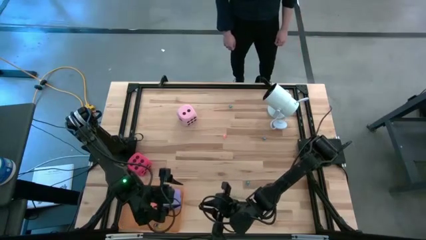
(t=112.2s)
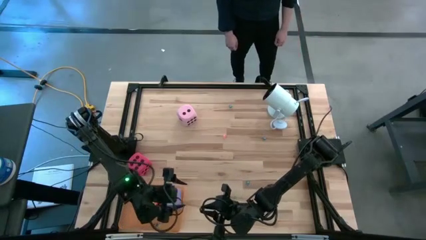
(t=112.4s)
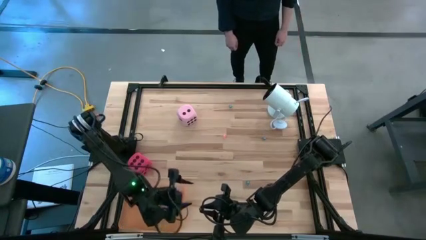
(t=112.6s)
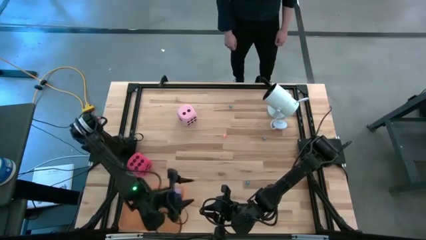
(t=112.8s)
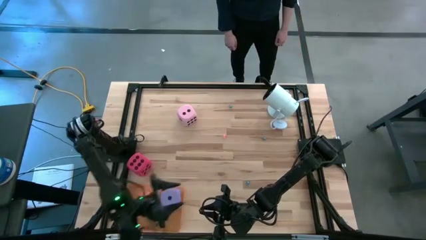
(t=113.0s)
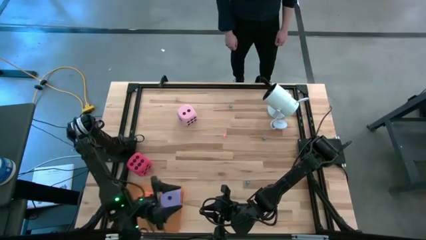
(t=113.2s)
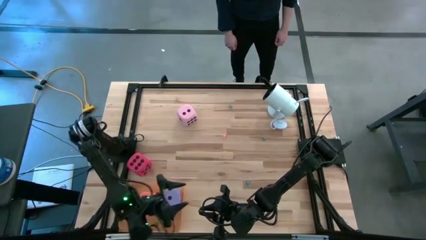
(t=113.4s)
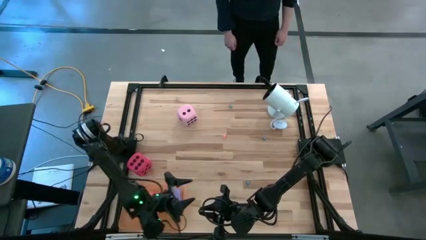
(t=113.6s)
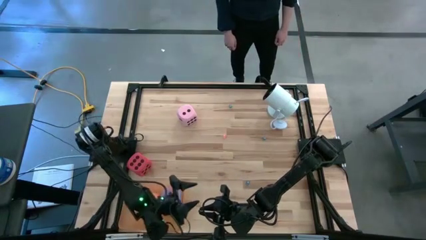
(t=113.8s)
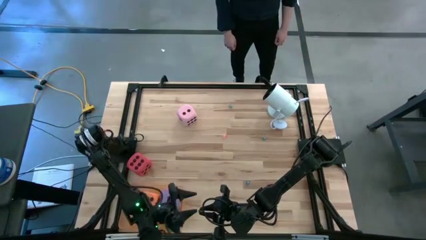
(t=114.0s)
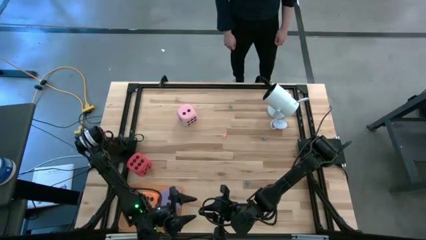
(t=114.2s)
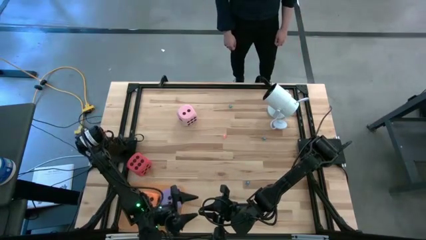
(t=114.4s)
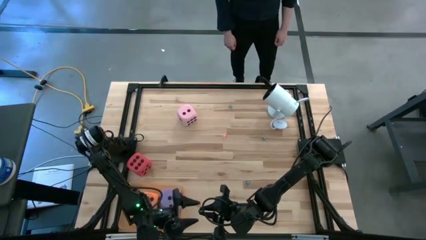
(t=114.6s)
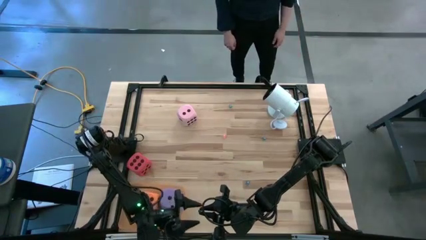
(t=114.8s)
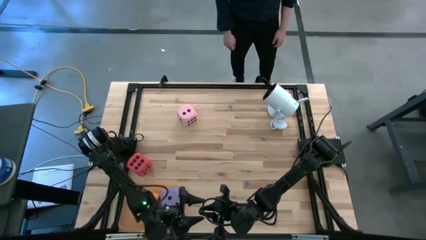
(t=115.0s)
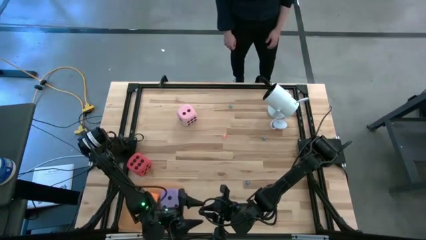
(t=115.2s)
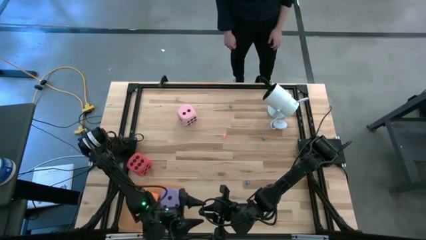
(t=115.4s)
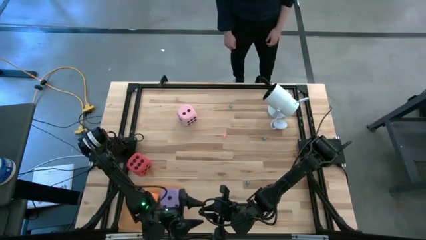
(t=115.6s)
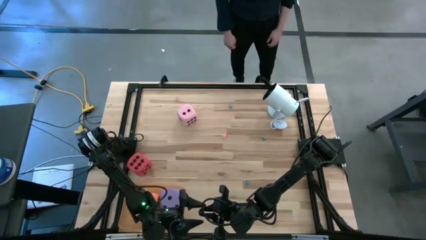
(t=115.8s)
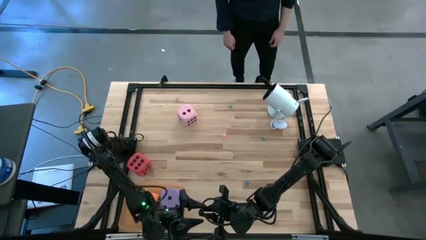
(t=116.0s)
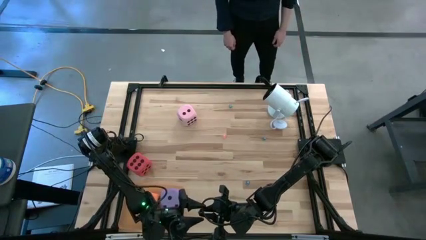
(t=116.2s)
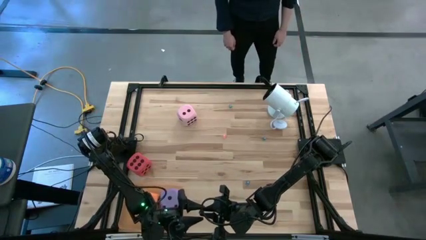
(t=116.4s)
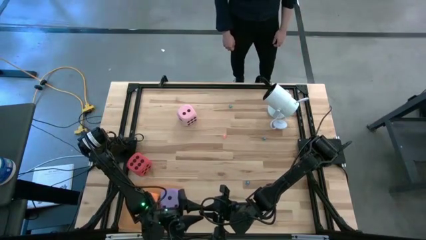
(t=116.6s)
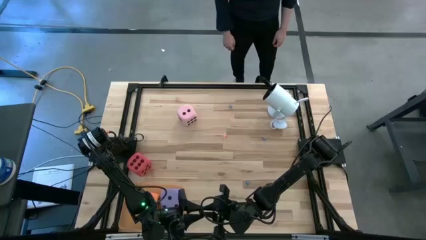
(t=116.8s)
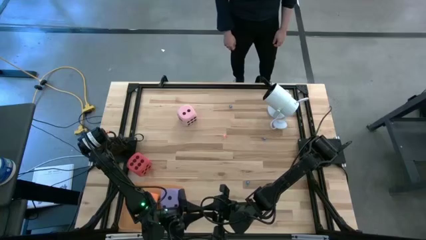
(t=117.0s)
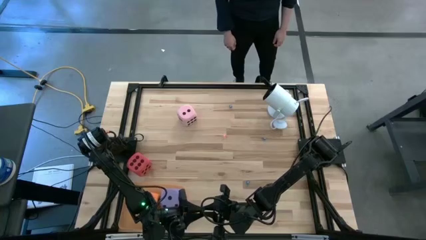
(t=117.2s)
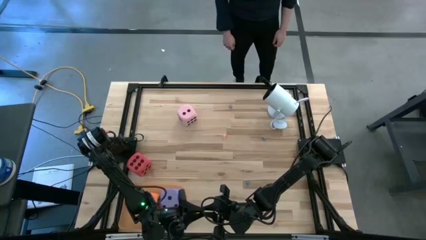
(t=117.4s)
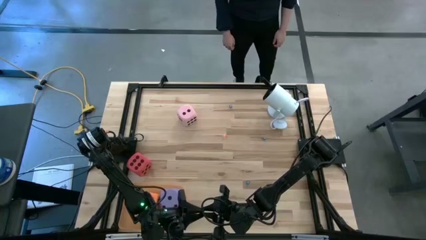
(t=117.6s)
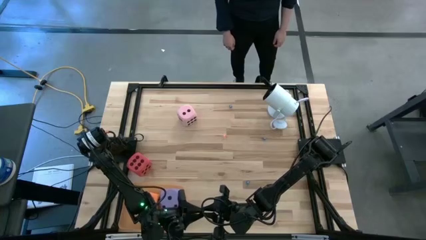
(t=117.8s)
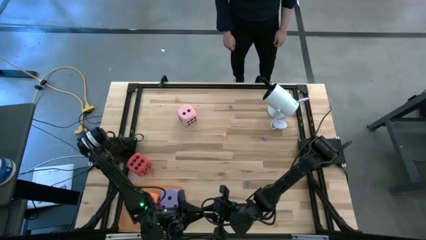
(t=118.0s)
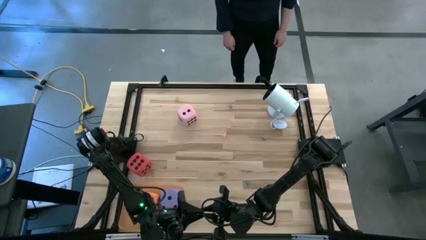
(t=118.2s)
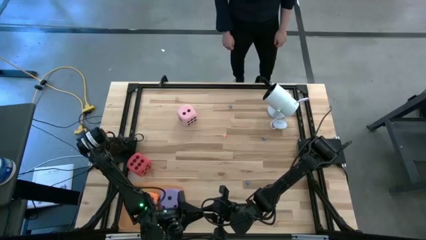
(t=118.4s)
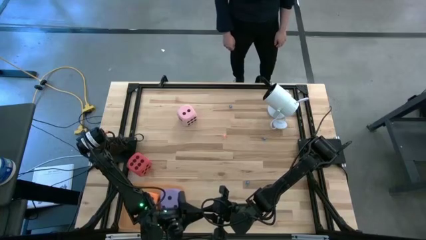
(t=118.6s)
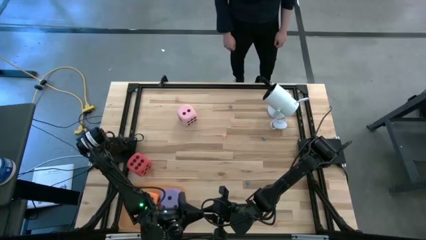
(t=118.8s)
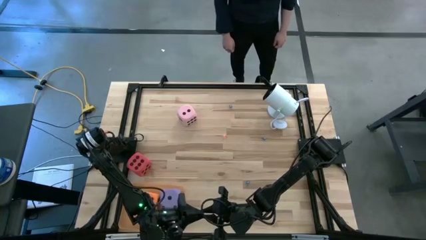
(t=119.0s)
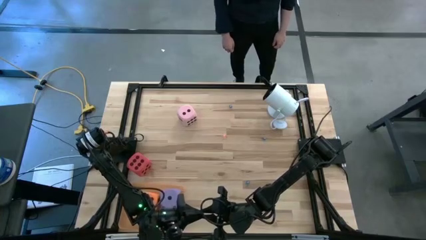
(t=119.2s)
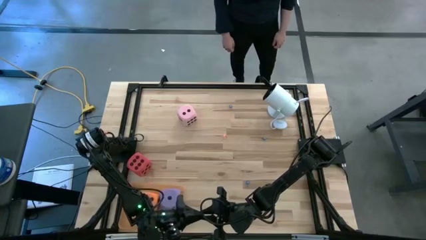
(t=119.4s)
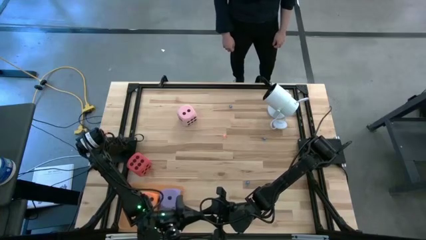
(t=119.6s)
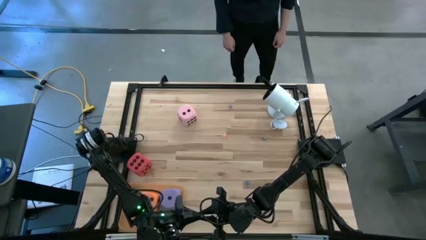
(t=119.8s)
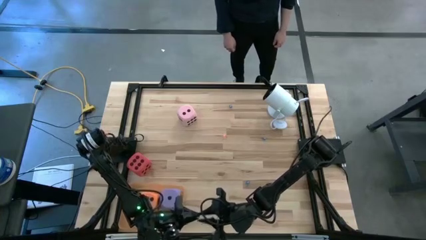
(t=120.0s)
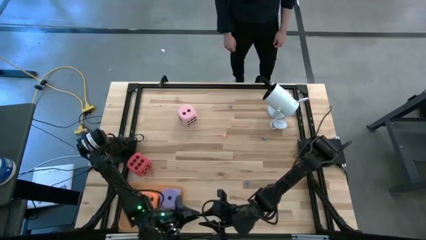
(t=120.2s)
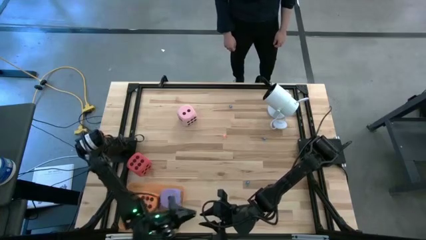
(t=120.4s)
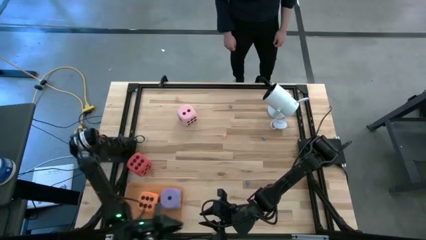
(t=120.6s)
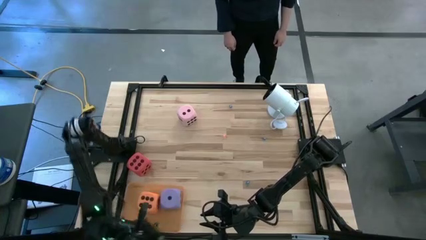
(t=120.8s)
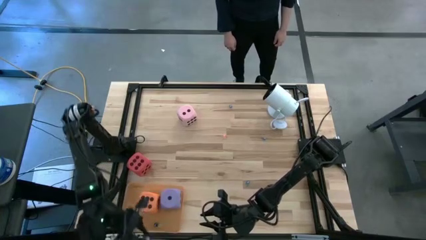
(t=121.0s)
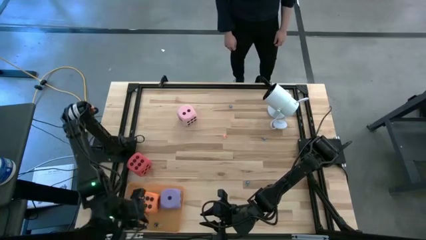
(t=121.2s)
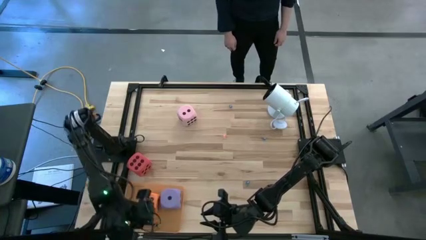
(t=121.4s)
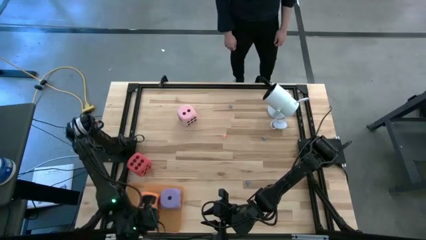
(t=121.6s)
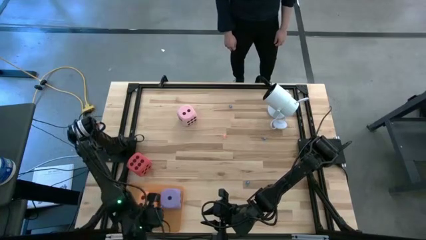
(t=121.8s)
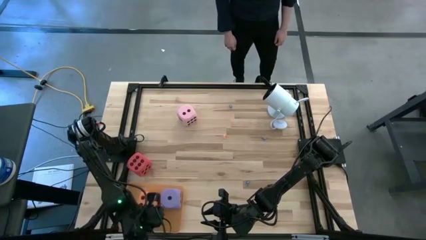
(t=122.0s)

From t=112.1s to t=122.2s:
Task: Pick & Place Dice
Put the small black dice into the orange bin

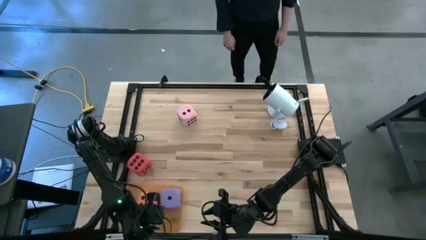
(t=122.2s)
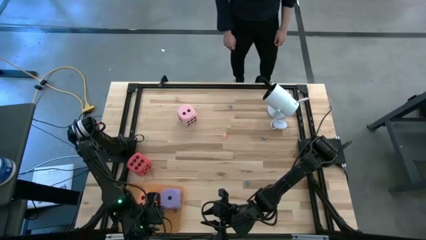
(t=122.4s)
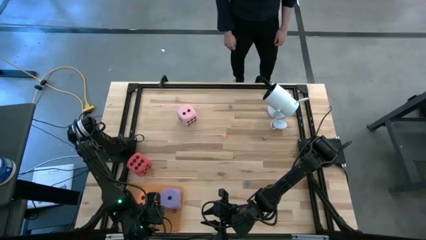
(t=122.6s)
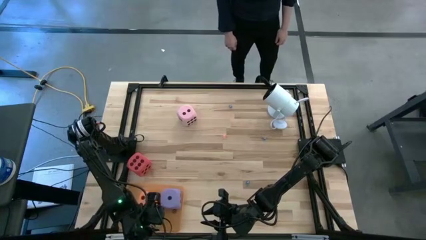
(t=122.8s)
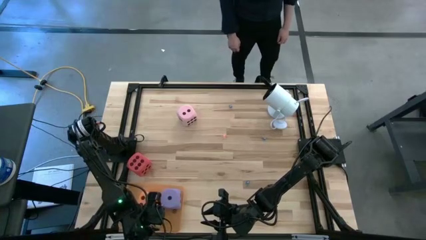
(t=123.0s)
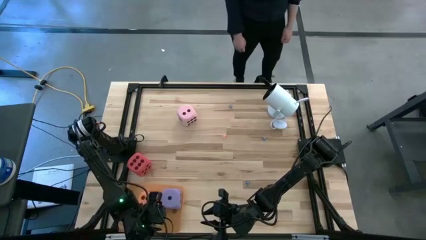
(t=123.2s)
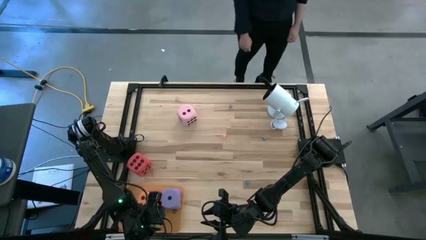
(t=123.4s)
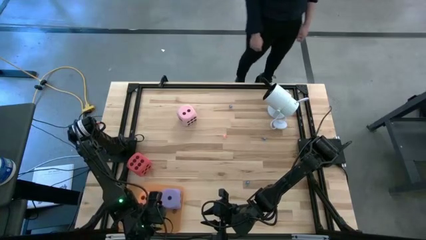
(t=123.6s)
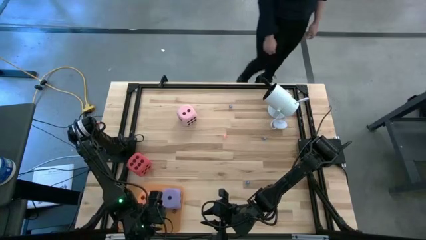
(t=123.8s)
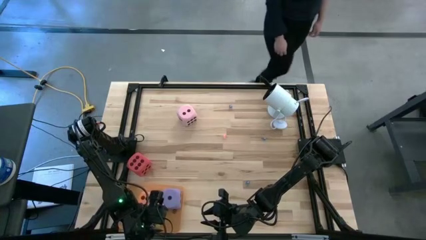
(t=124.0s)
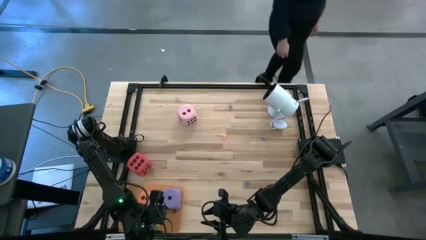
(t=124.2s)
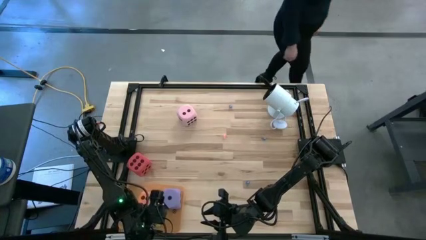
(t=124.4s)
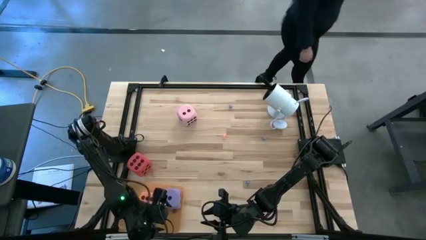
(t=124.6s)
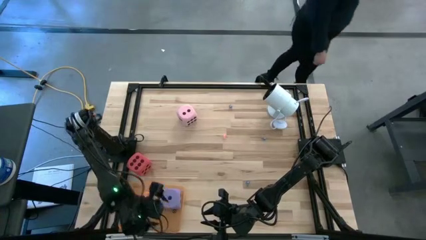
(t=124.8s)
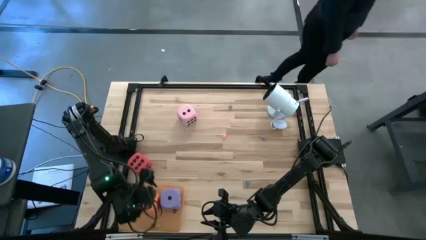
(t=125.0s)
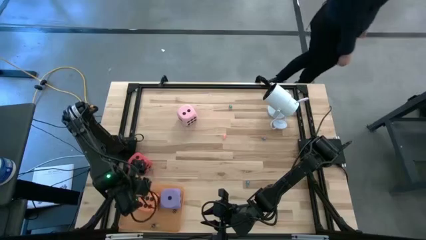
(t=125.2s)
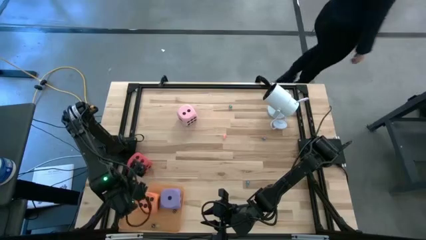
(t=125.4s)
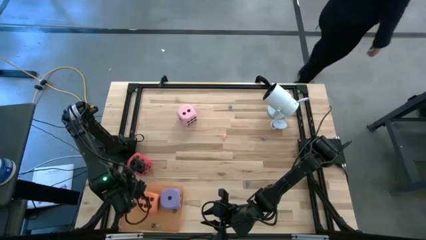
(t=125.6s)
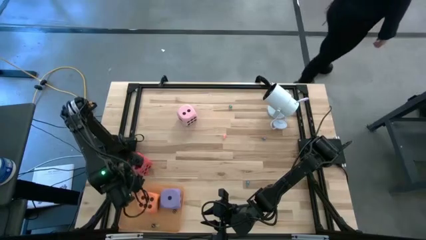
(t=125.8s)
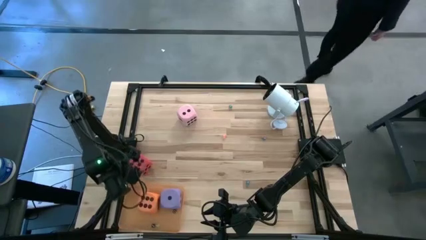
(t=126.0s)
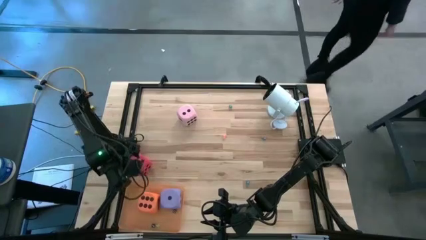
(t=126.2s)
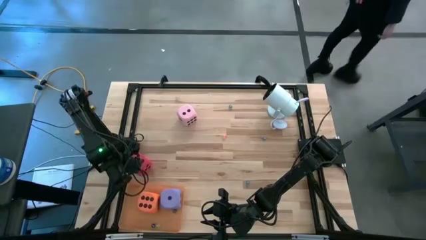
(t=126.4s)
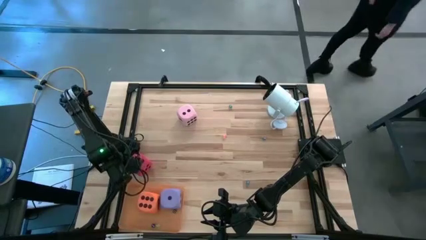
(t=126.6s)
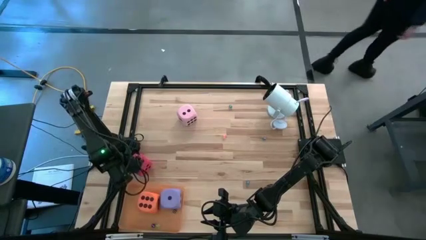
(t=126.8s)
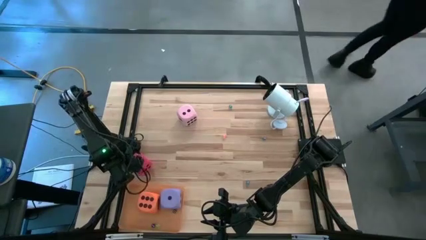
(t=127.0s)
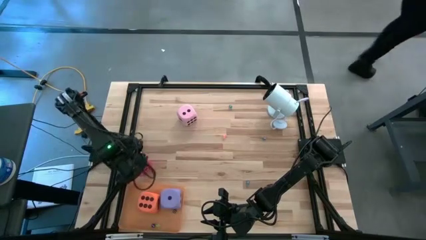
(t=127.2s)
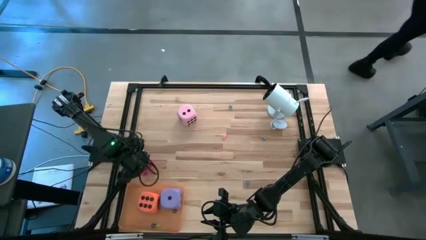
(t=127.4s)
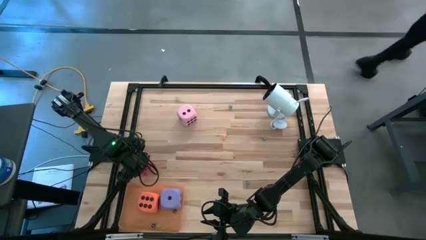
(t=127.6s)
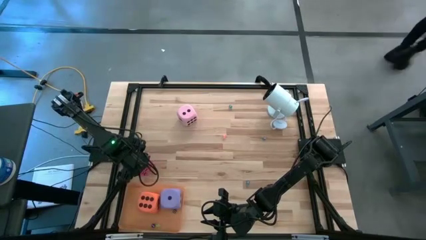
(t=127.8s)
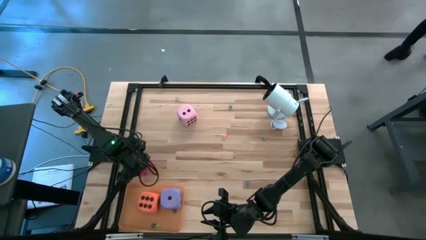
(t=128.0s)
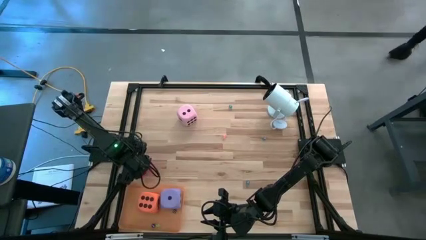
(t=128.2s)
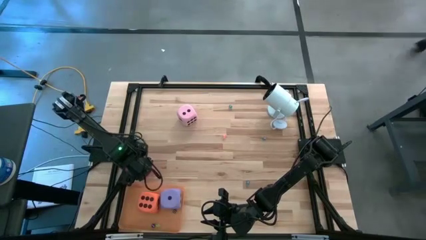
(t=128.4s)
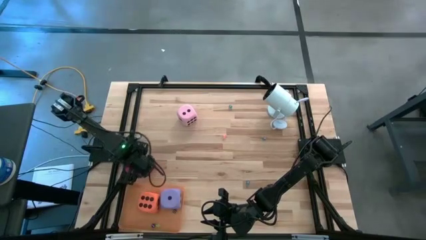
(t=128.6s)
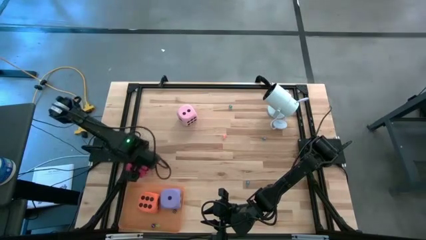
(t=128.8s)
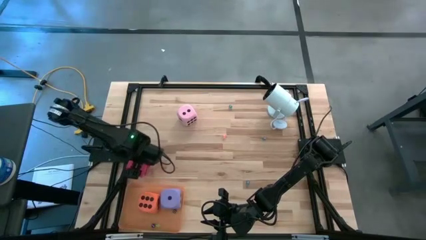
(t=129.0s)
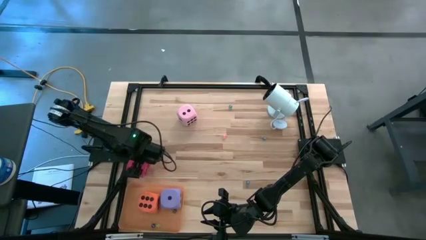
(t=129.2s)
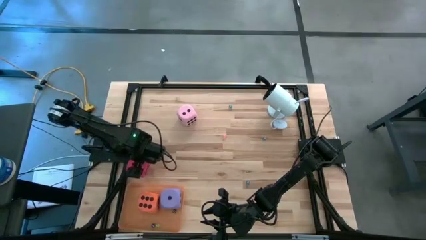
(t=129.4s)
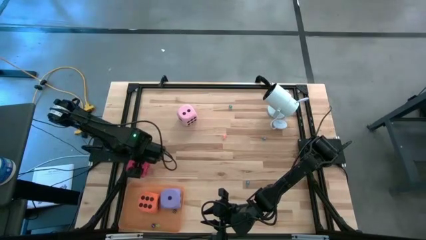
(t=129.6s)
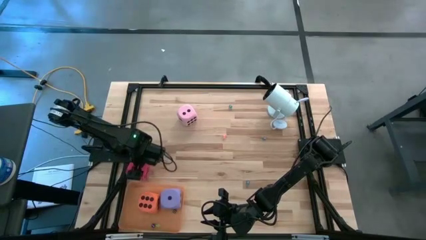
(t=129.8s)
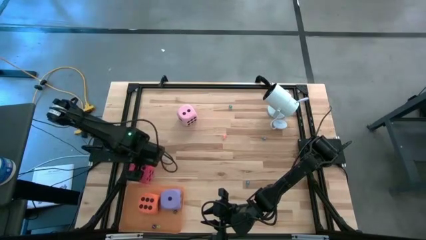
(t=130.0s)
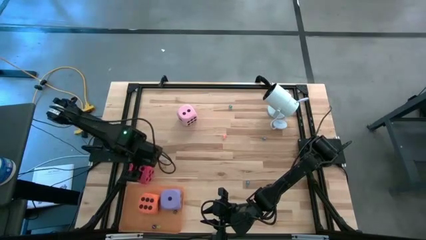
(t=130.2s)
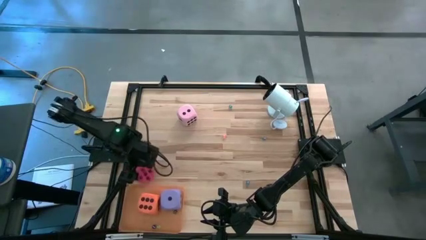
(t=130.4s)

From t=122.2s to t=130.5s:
Put the large red dice into the orange bin
